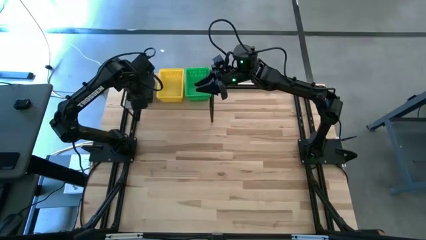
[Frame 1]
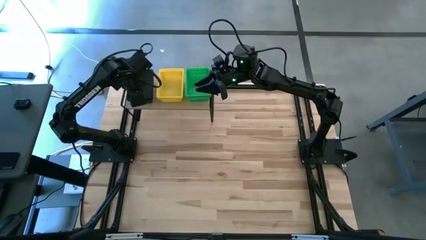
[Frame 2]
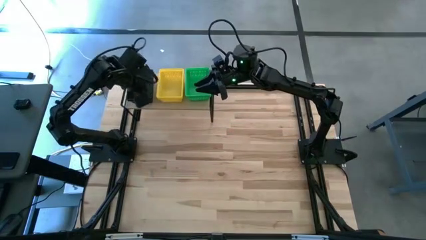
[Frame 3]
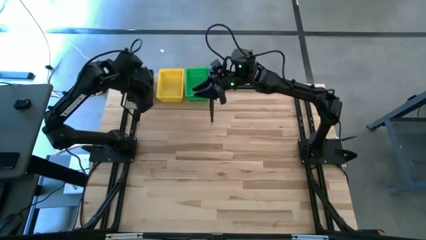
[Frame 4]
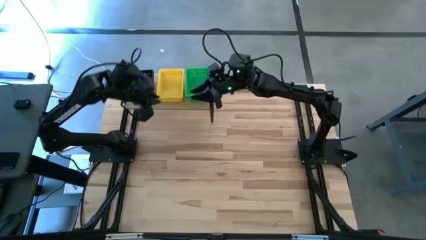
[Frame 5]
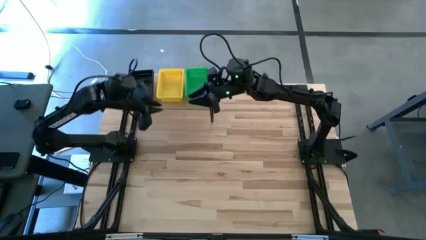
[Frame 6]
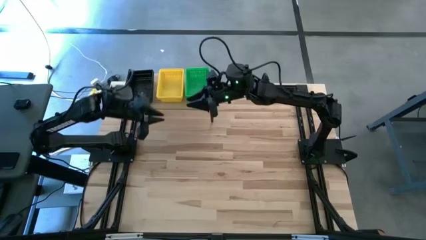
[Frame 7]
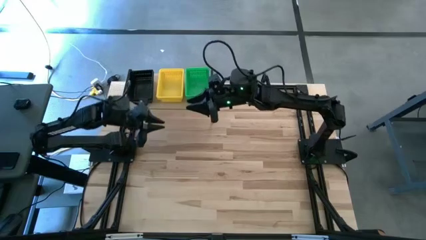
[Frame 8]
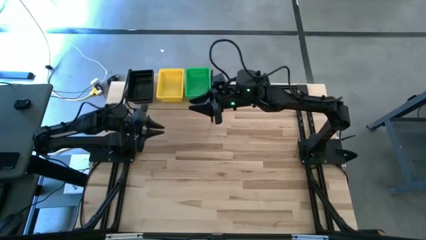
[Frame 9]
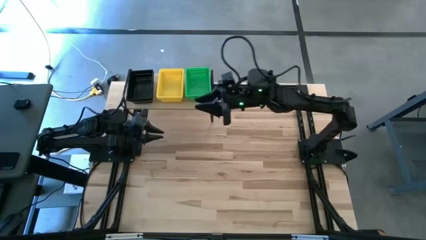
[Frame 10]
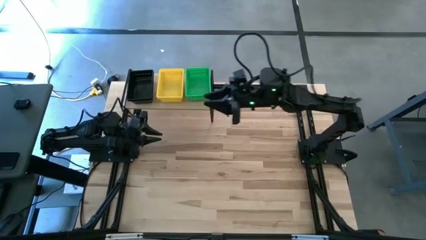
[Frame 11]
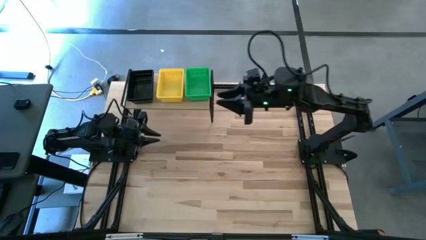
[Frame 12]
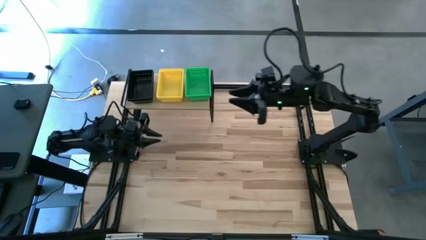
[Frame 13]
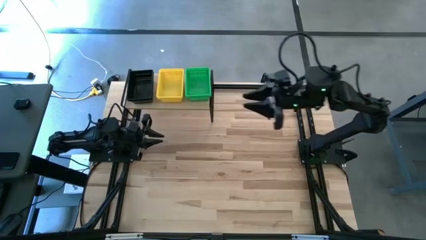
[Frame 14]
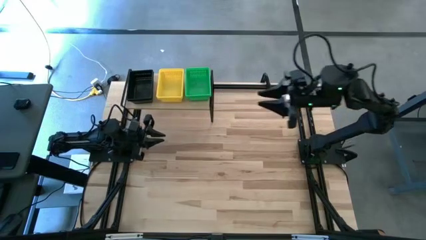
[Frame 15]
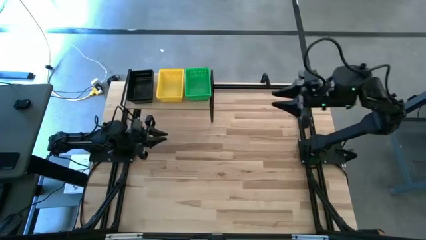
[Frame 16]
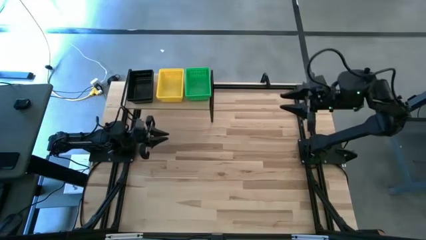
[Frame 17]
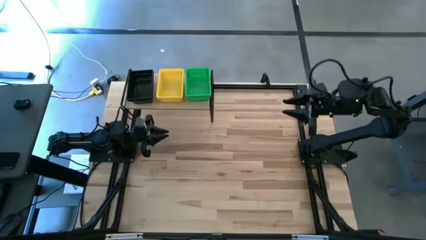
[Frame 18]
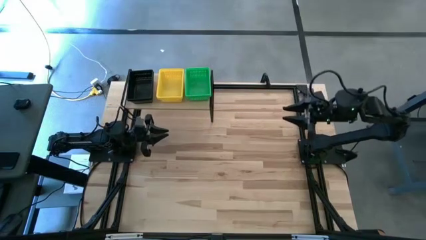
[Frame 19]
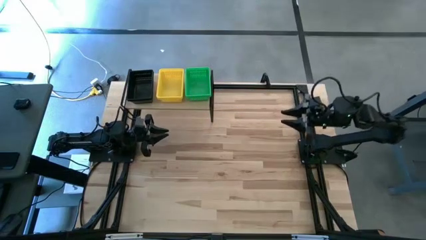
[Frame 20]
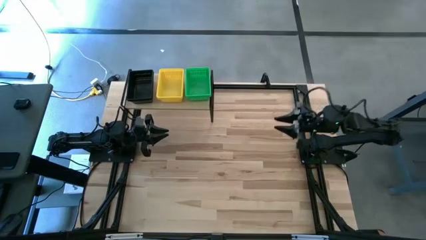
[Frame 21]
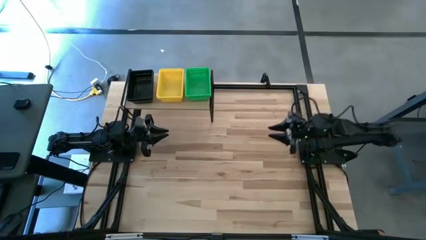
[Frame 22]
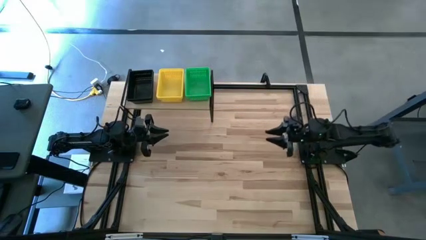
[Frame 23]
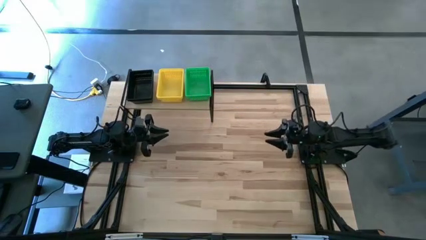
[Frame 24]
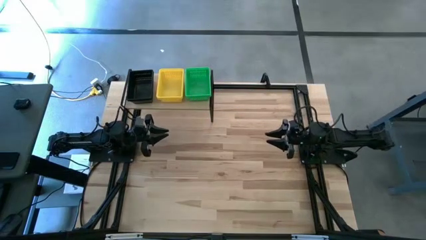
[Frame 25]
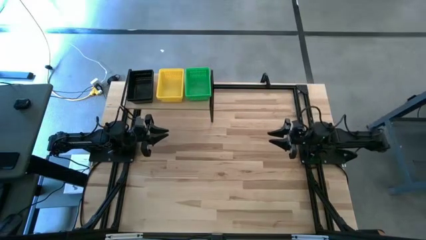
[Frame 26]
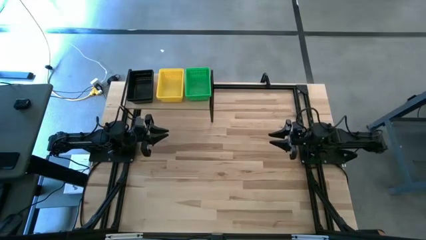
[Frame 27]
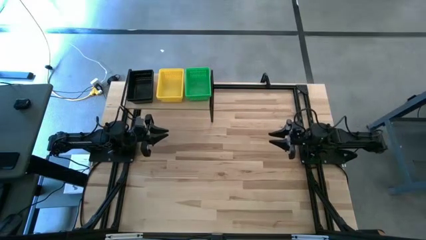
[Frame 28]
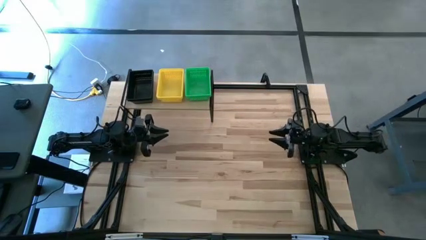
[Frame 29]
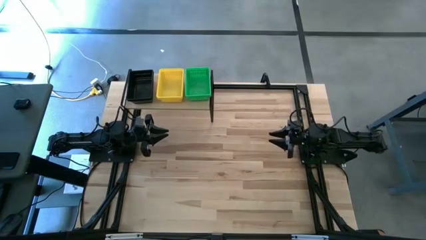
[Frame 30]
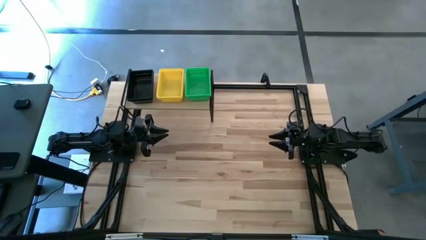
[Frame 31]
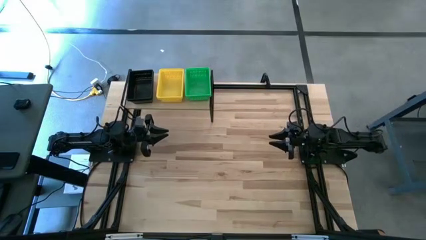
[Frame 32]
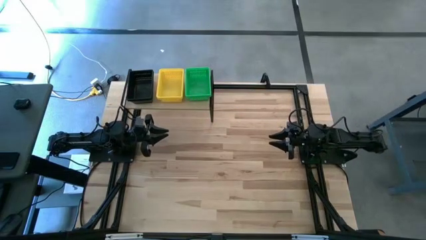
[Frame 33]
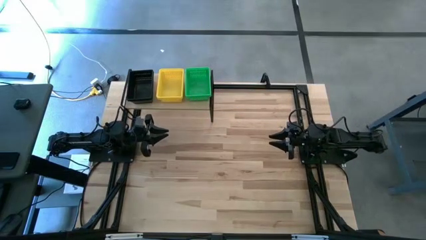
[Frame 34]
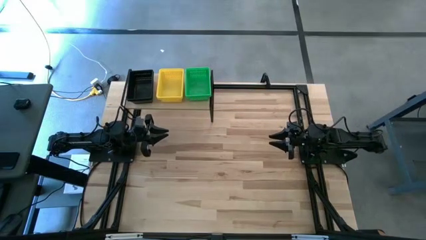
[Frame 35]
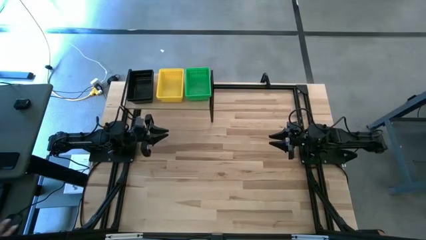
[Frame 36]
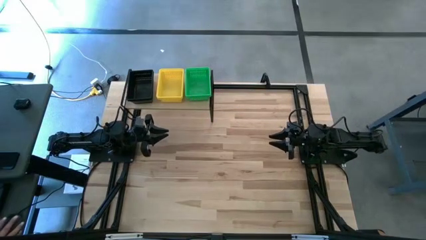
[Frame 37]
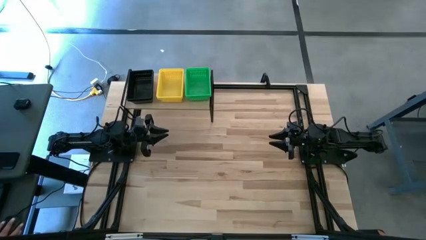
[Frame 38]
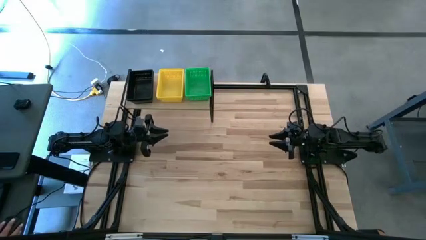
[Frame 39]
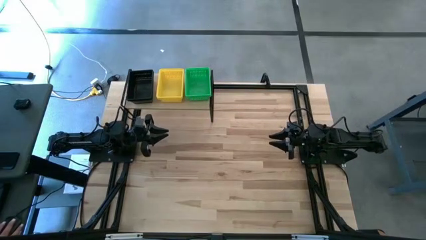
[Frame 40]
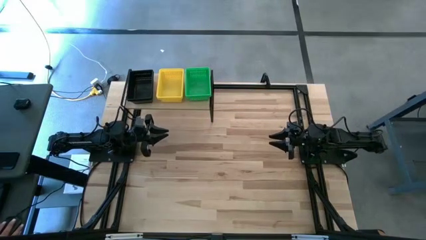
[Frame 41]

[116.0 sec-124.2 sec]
Task: Stack baskets on shelf by color
Return to Home Position

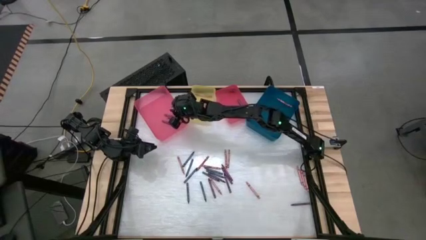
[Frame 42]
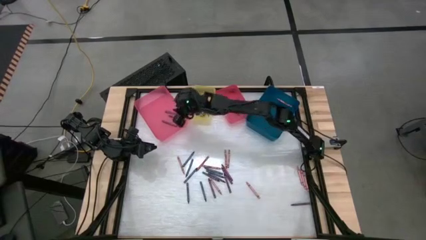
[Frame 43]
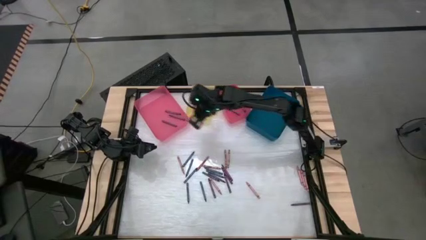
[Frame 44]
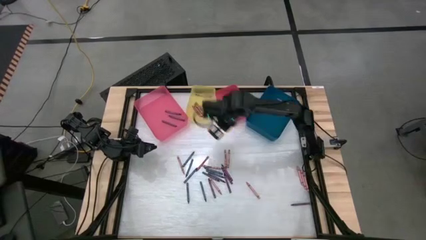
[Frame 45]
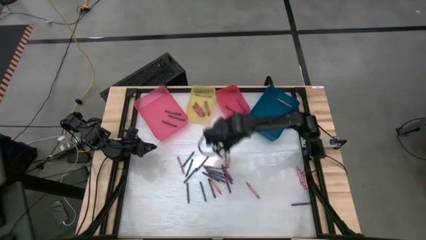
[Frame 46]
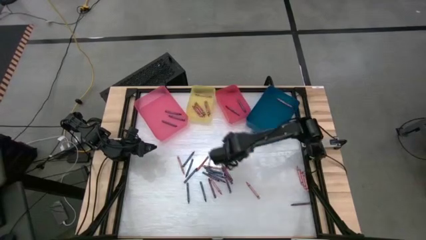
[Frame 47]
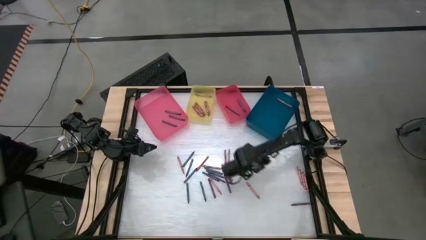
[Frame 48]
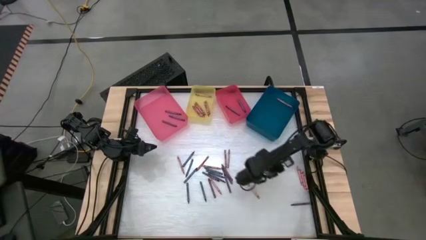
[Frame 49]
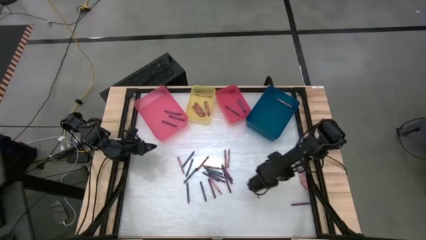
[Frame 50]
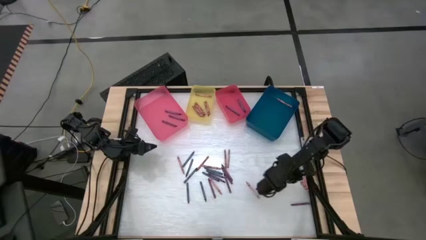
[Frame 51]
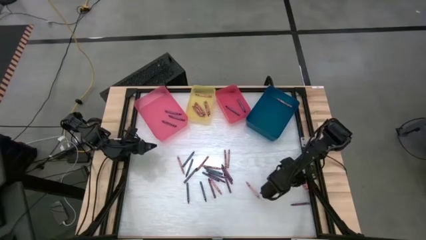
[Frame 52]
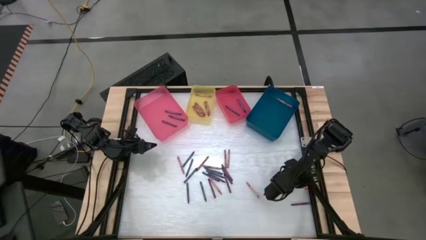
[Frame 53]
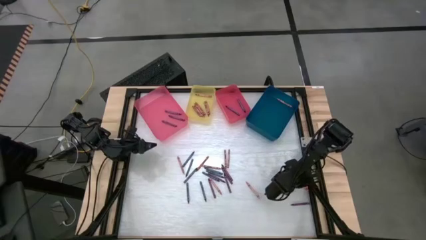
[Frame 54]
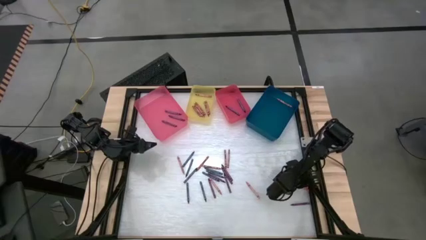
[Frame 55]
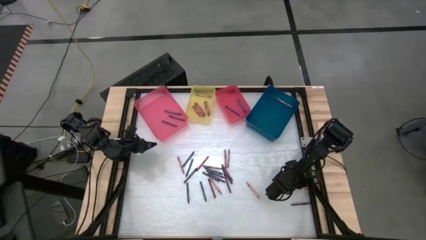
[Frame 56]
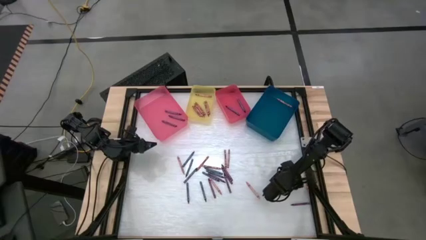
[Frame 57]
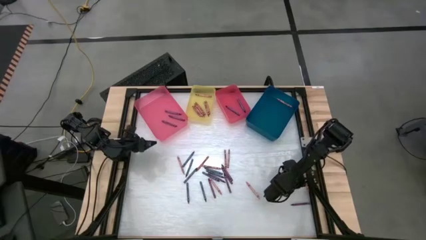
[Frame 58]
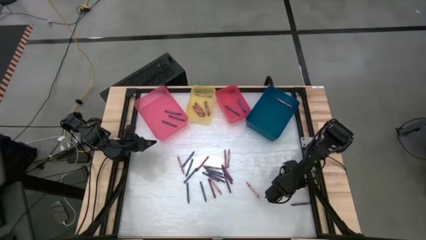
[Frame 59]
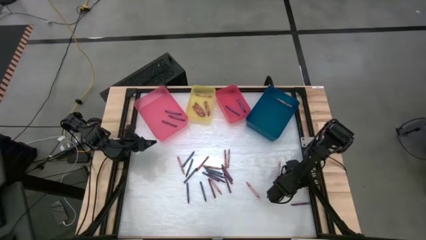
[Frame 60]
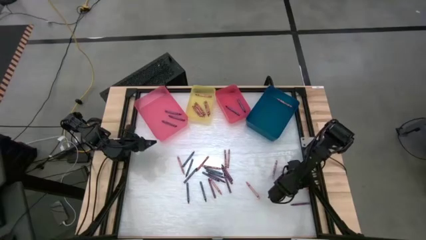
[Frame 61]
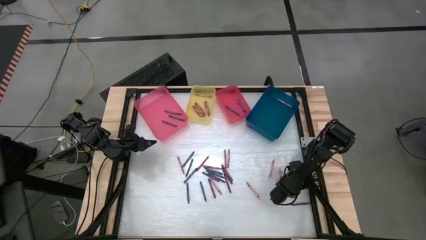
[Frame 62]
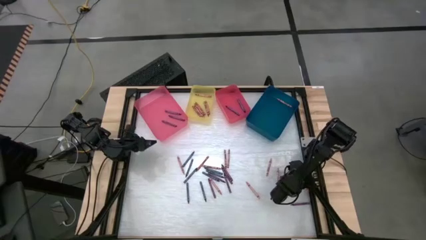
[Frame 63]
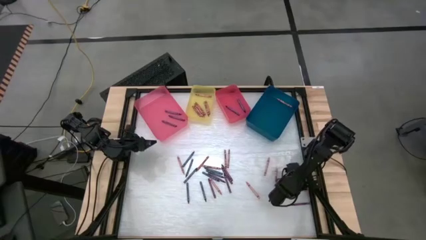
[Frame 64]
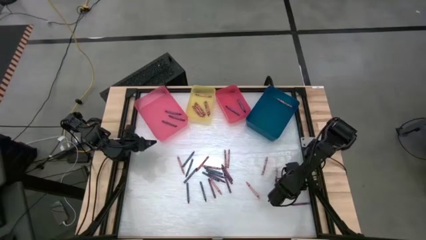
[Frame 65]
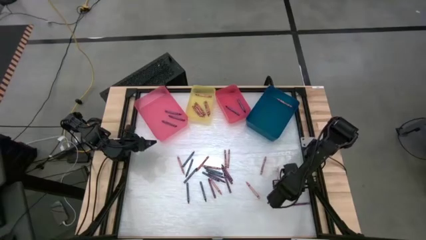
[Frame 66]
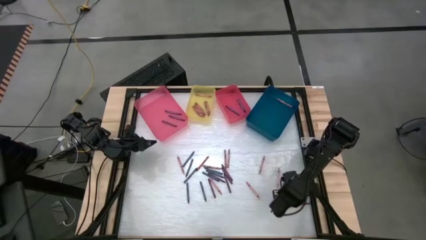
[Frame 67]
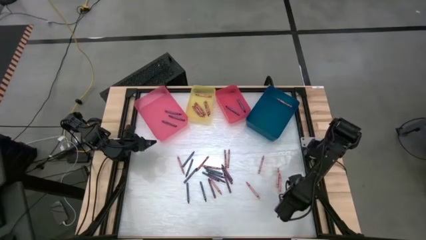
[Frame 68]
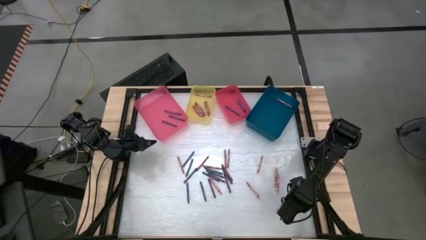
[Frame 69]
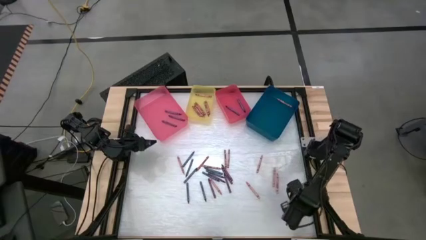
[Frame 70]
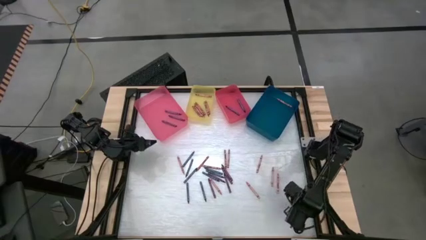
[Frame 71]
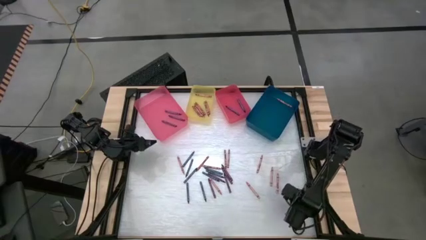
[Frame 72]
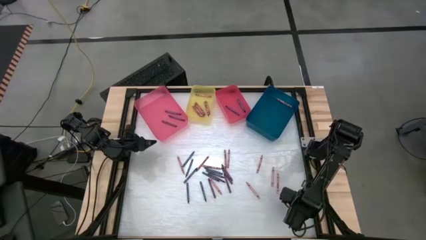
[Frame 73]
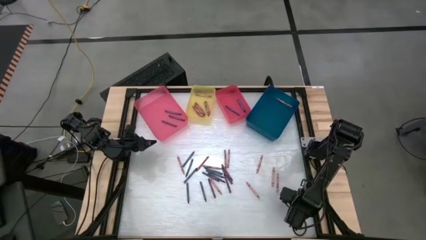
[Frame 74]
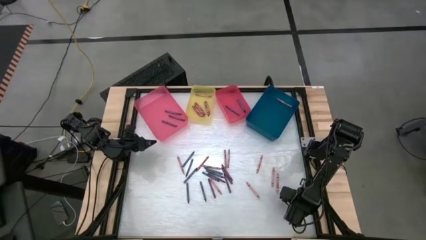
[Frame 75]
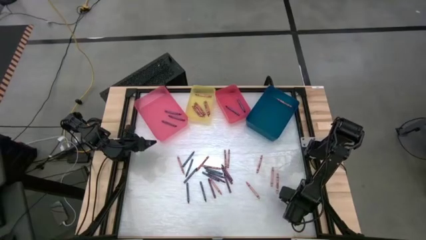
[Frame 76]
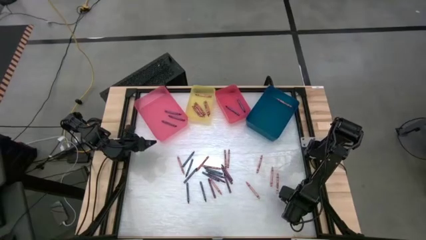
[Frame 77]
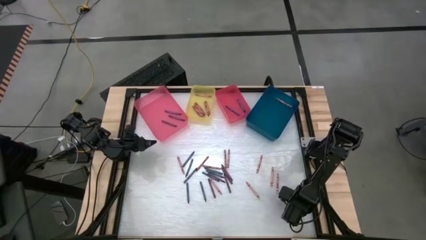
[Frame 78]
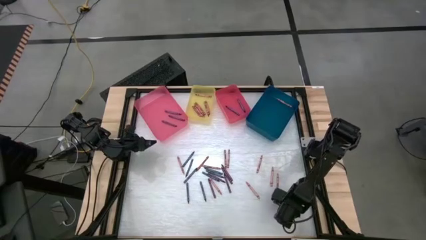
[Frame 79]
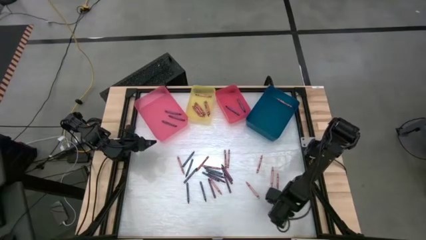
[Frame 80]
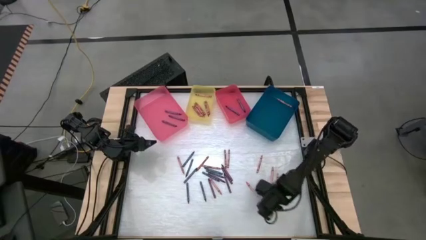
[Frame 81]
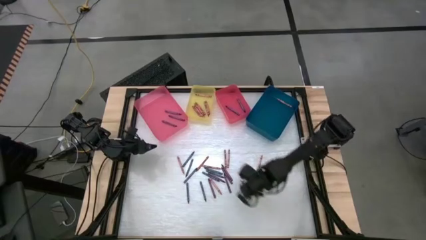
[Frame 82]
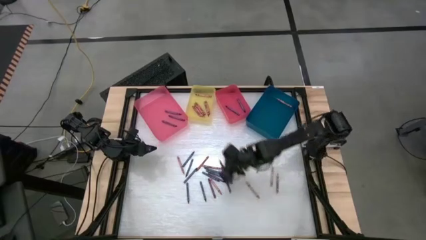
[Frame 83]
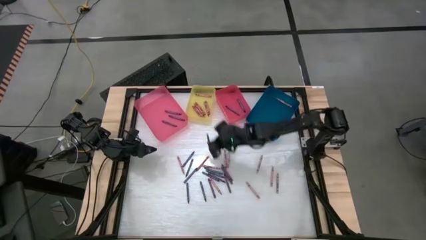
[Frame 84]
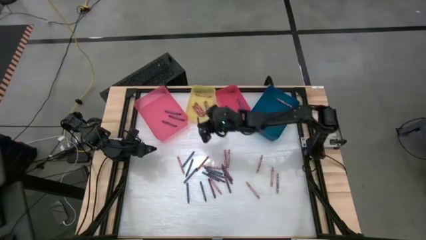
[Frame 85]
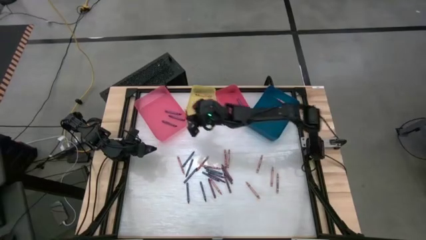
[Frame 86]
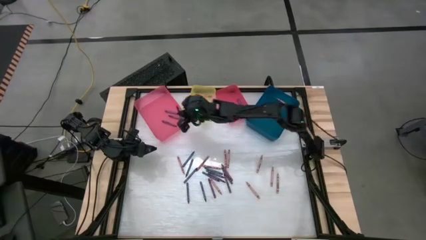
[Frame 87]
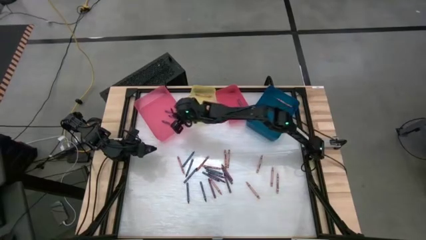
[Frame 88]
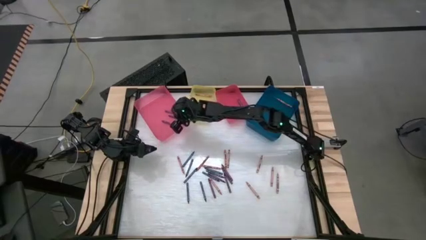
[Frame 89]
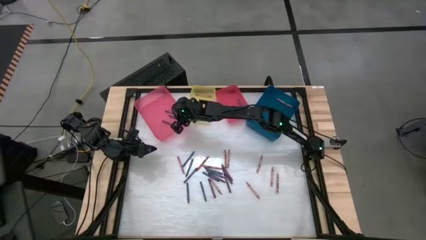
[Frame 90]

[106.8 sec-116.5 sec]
Task: Sort crayons
Put the violet crayon into the pink bin
